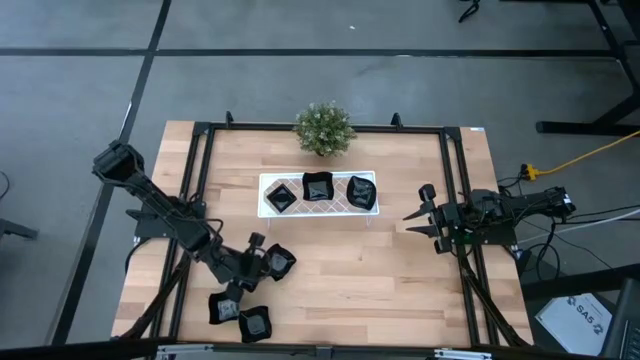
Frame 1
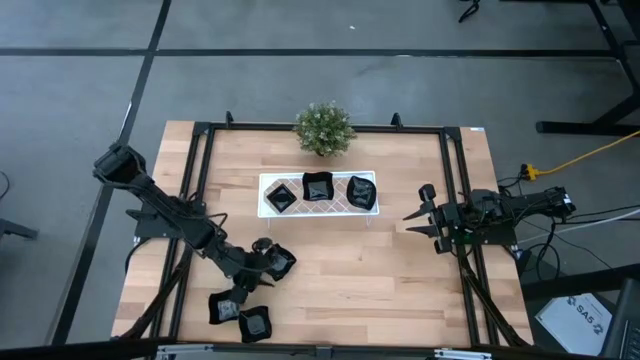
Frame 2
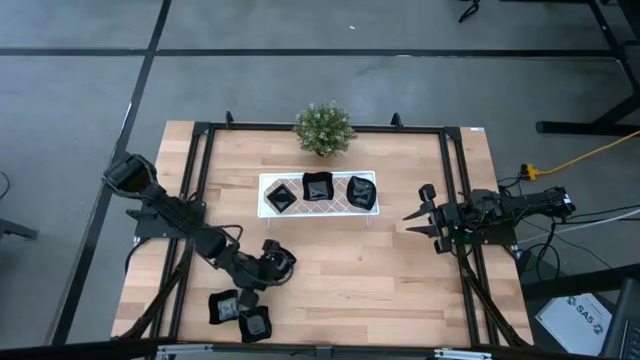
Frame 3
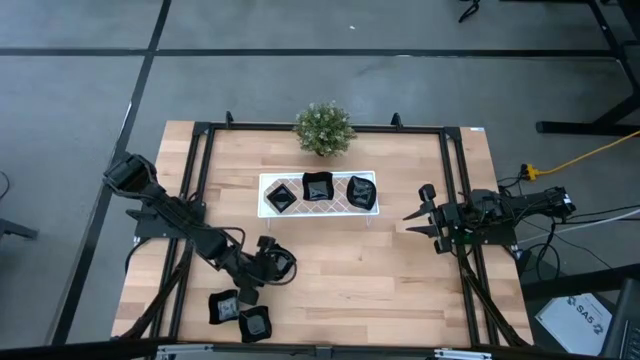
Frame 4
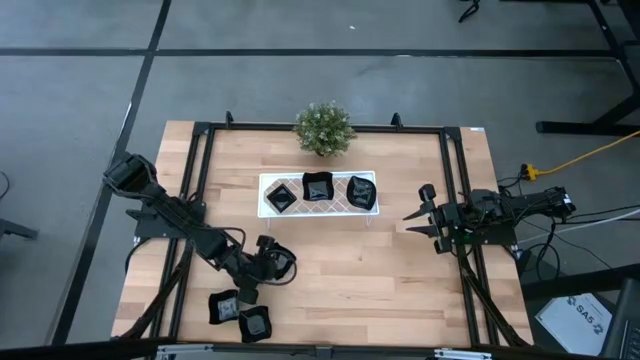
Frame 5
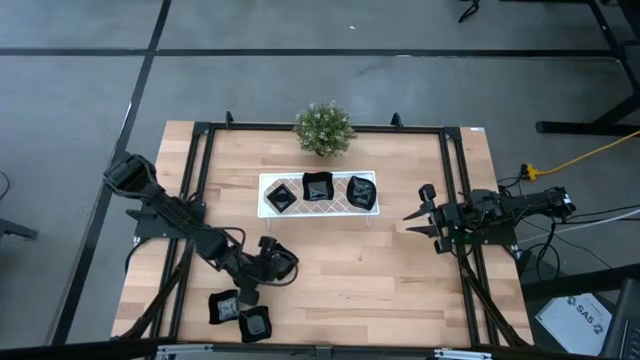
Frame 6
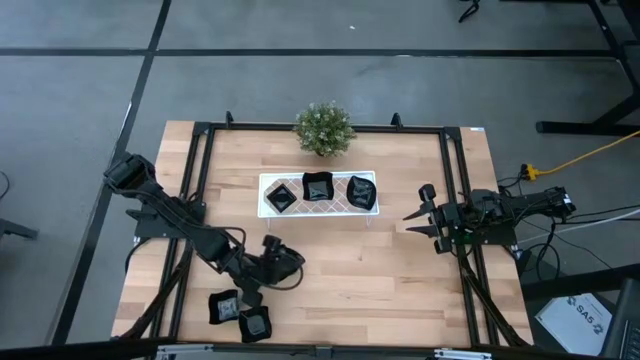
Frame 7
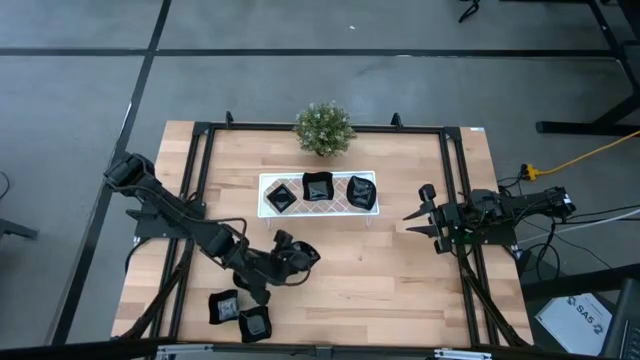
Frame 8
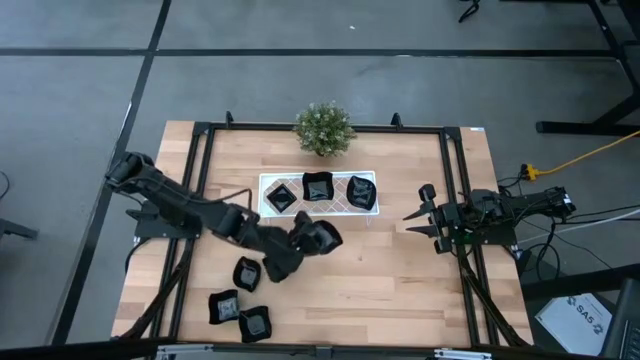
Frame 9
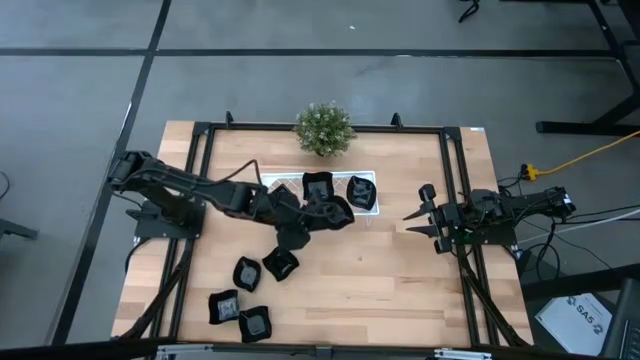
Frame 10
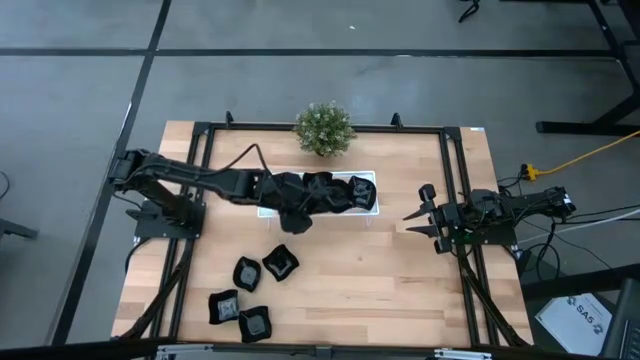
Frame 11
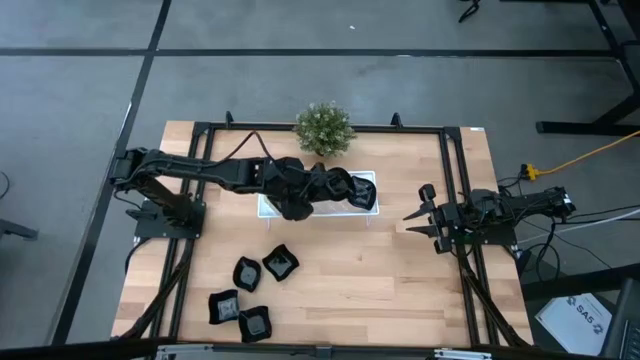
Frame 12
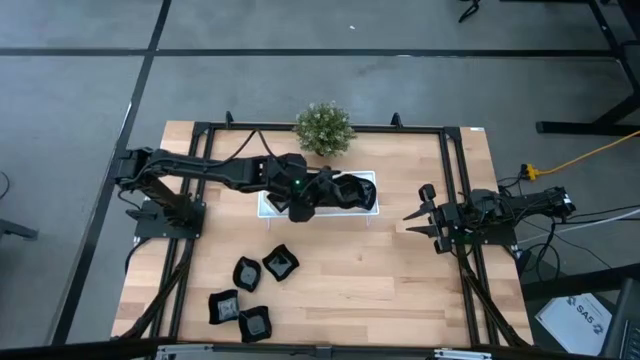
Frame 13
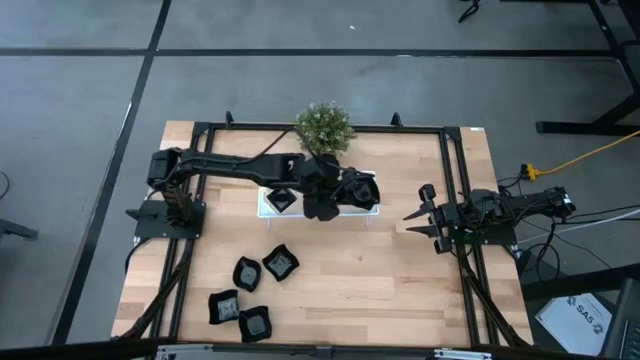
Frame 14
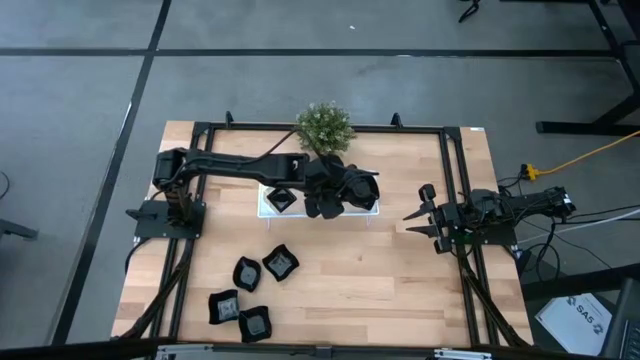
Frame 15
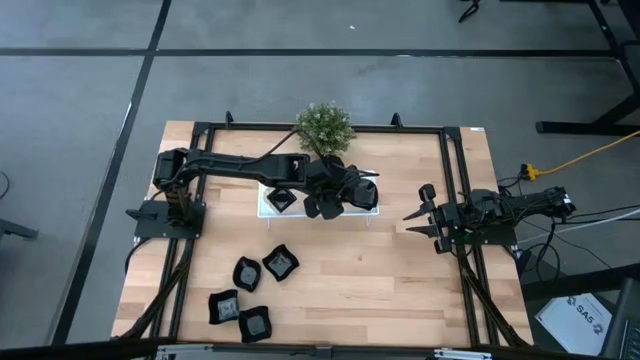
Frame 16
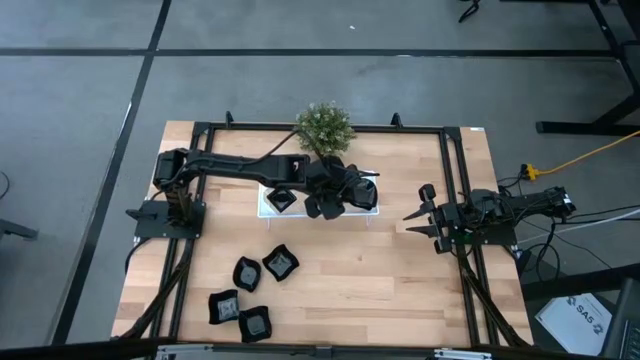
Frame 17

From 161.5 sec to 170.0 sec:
Task: Pick & Place Mini shaped plates
Stack the black leaf-shaped plate on top of the black leaf-shaped plate on the shelf

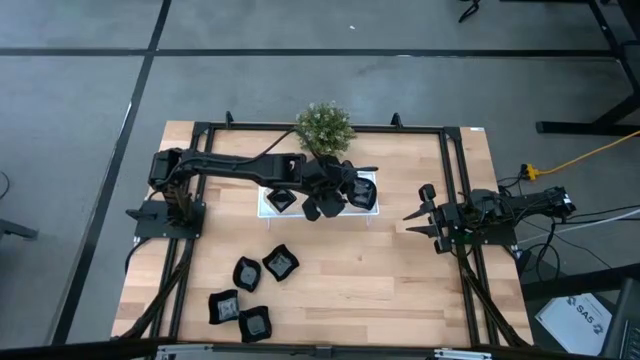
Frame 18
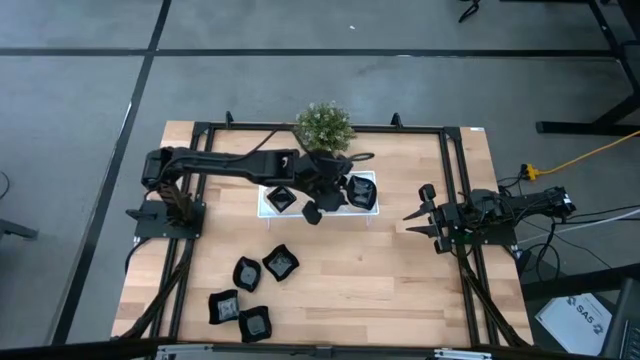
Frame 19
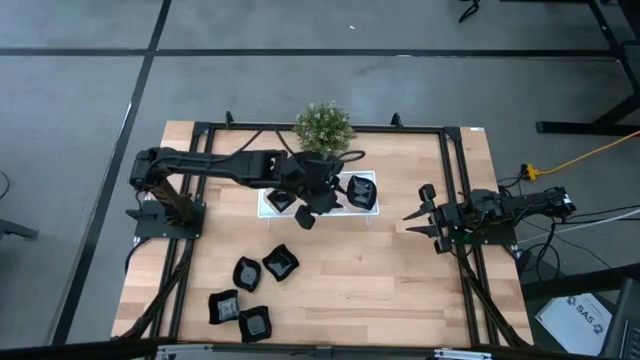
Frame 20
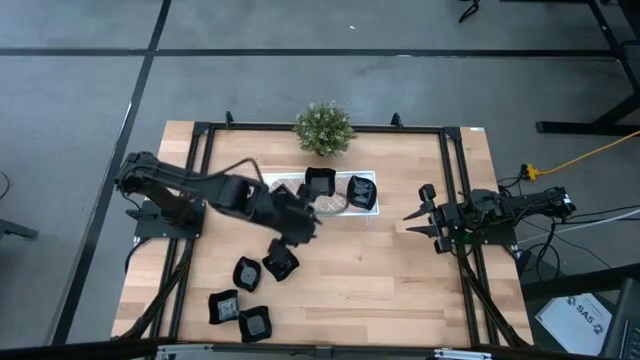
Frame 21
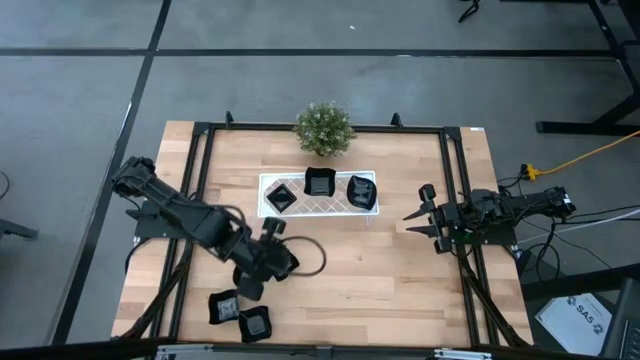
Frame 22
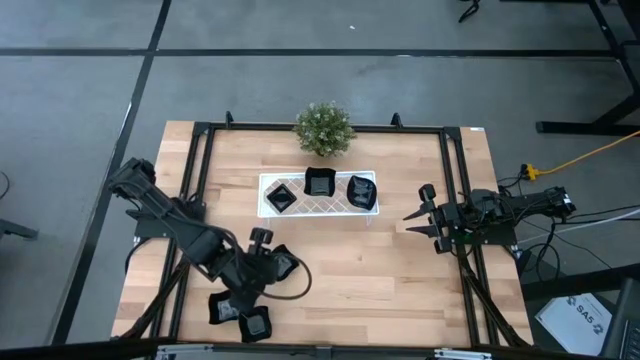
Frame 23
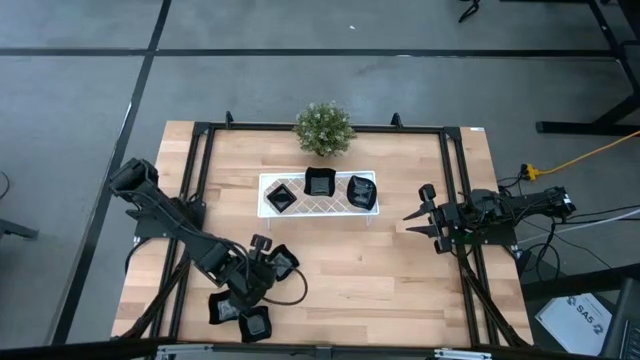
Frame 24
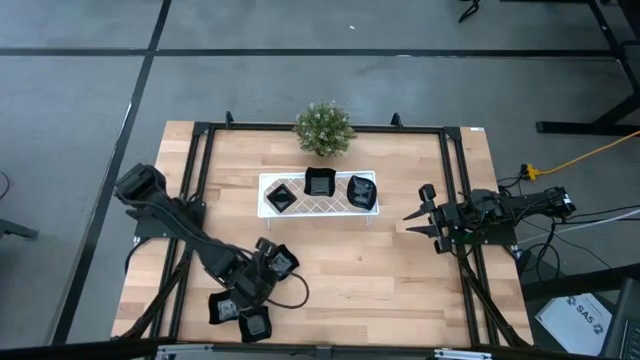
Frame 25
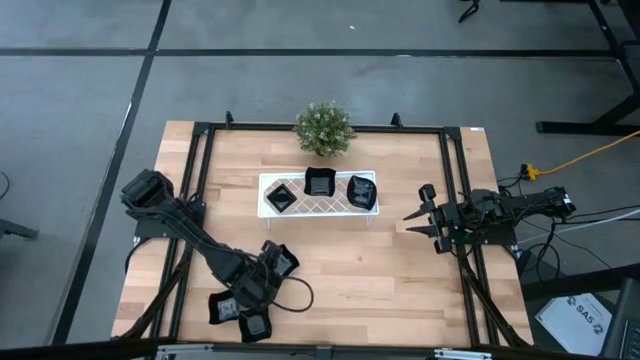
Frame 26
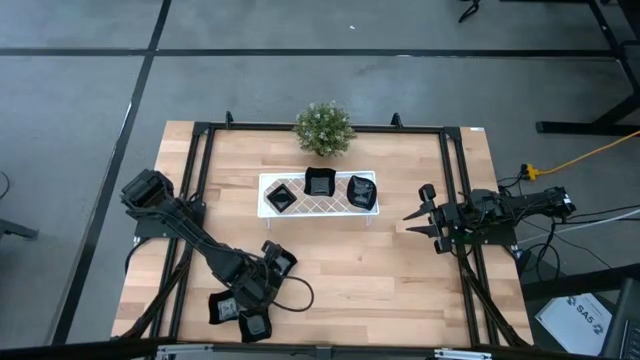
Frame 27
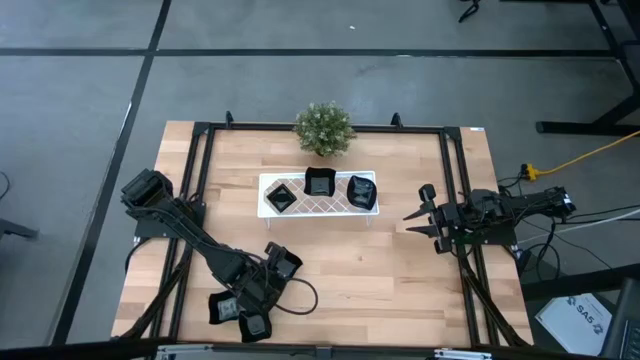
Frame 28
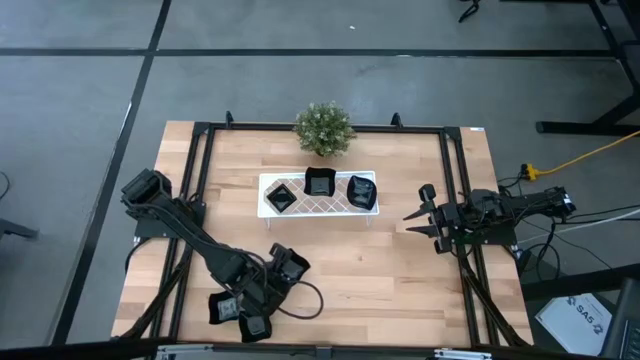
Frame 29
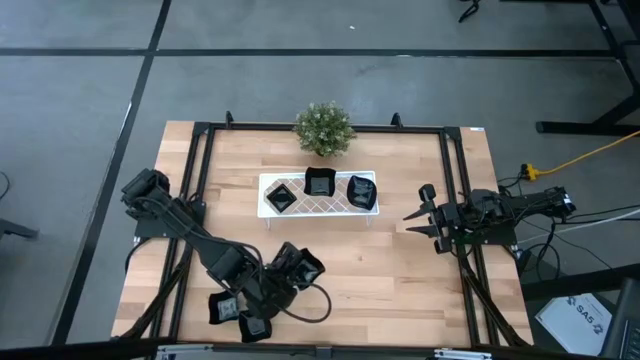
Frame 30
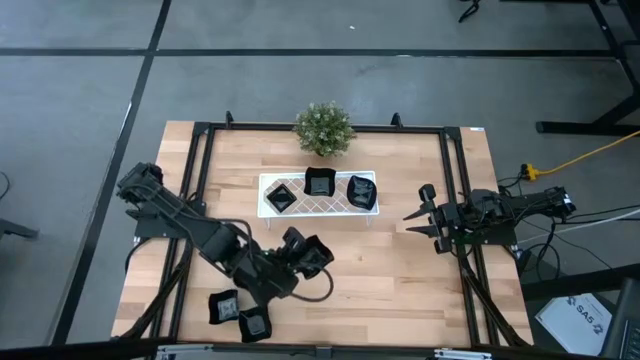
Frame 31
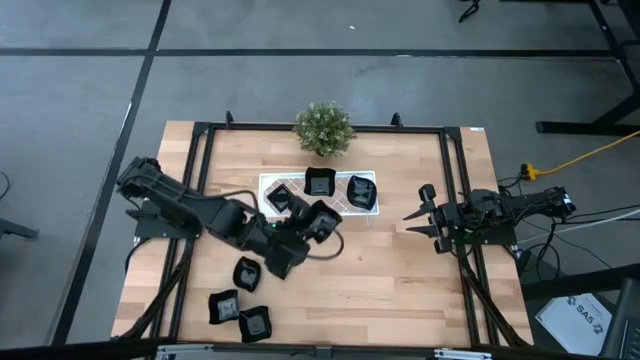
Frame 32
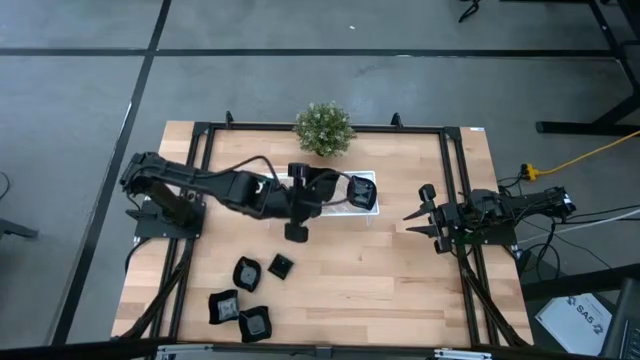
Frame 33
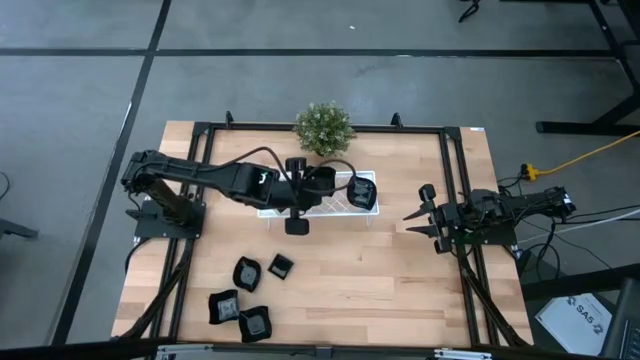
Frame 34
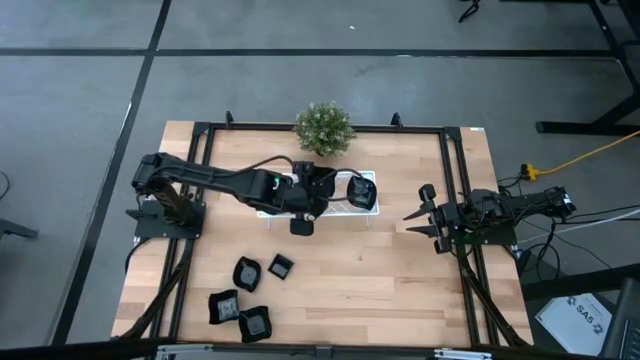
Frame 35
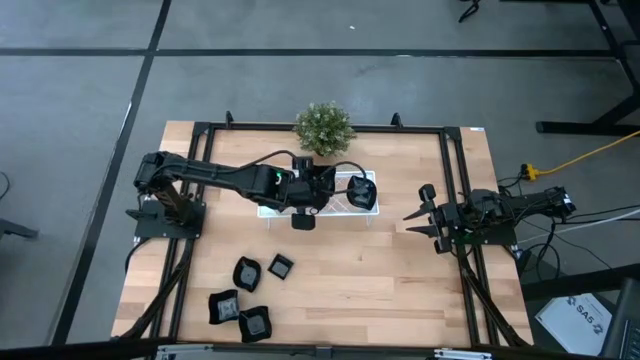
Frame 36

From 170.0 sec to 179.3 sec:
Stack the black distorted square plate on top of the black distorted square plate on the shelf

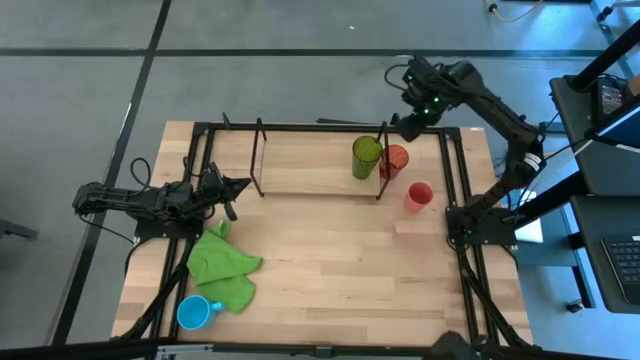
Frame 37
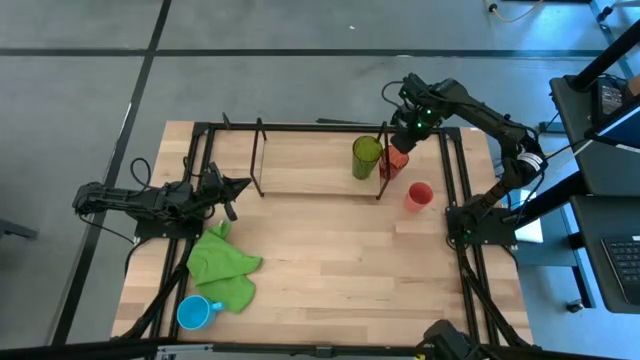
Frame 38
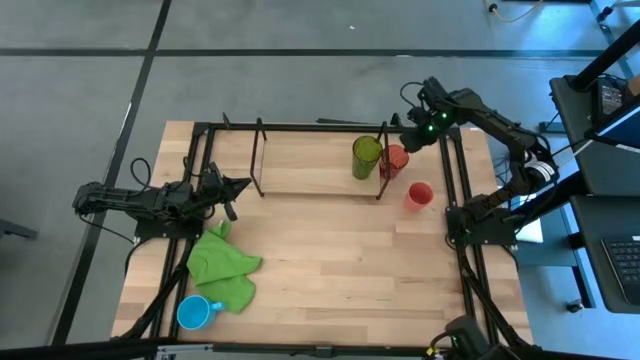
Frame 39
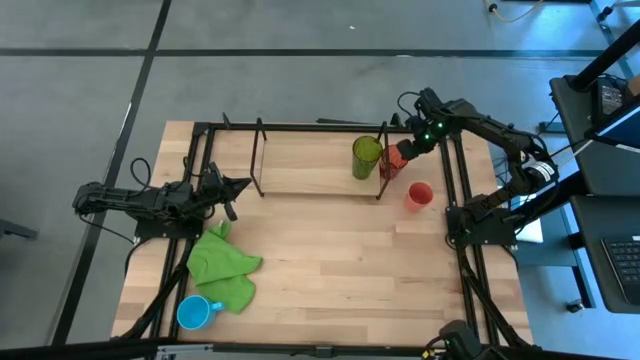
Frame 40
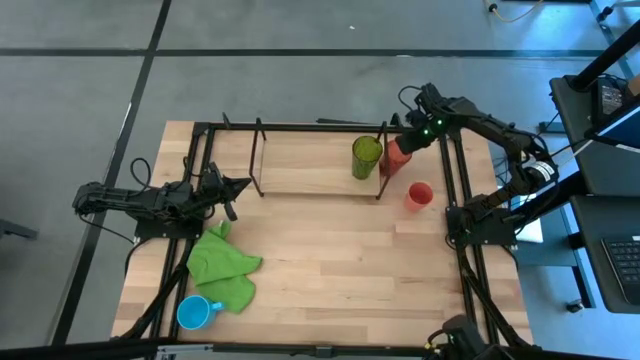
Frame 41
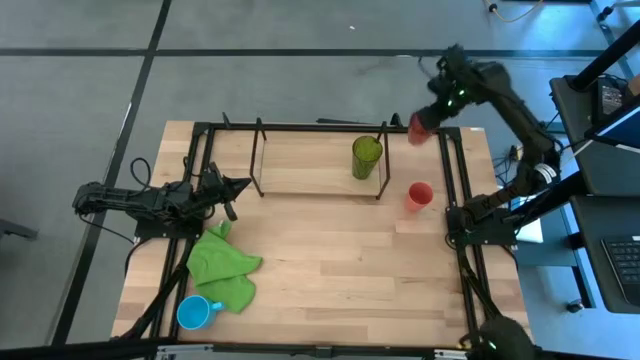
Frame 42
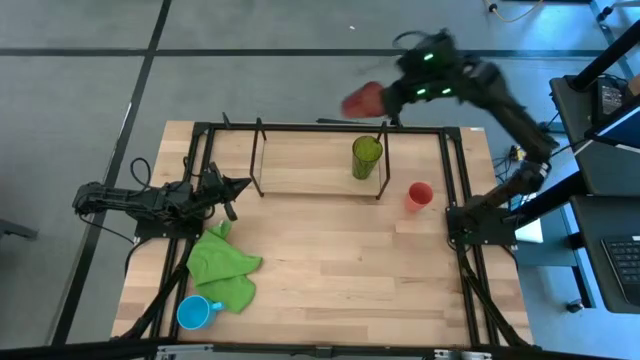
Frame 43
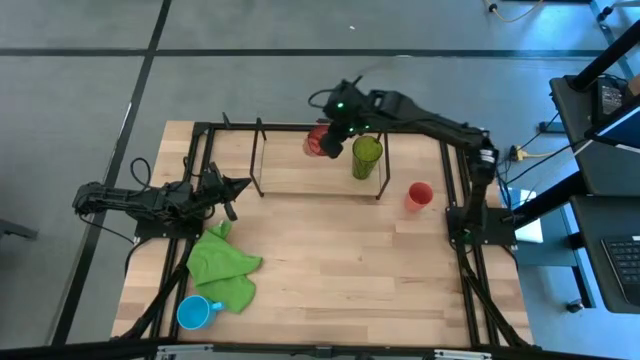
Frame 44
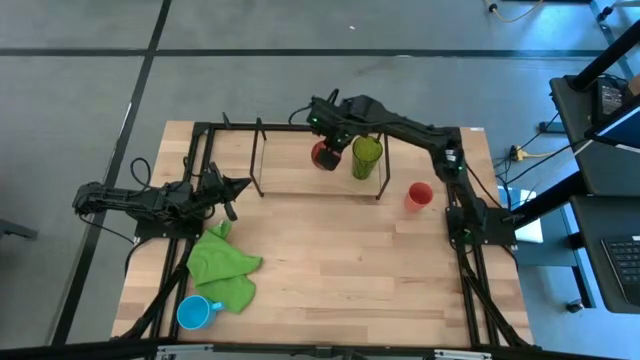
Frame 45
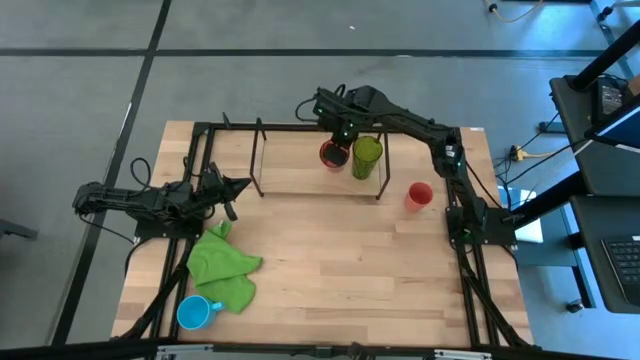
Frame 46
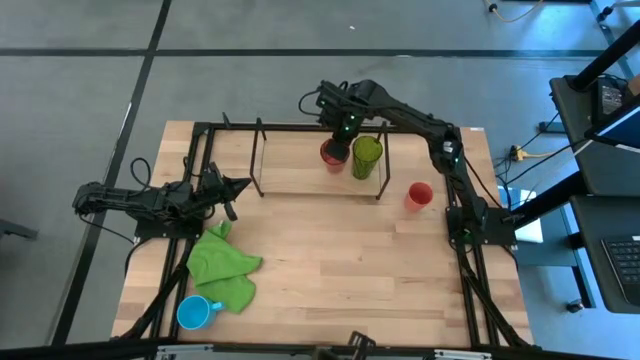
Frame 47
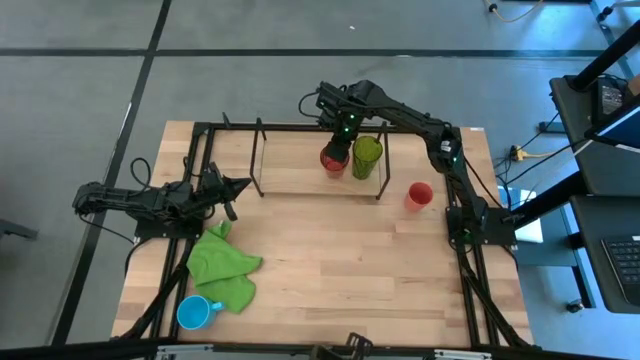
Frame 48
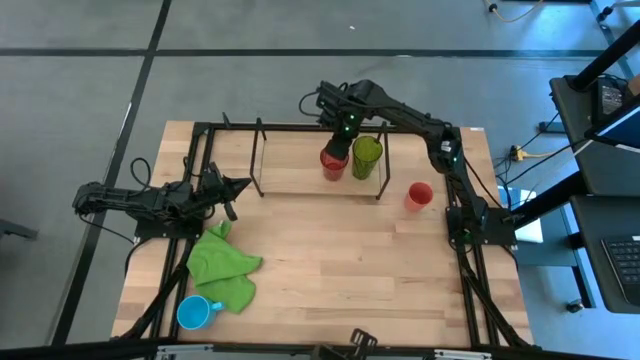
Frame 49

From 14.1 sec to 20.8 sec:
Task: Stack small to large cups/mugs on shelf
Put the light orange cup on the shelf
